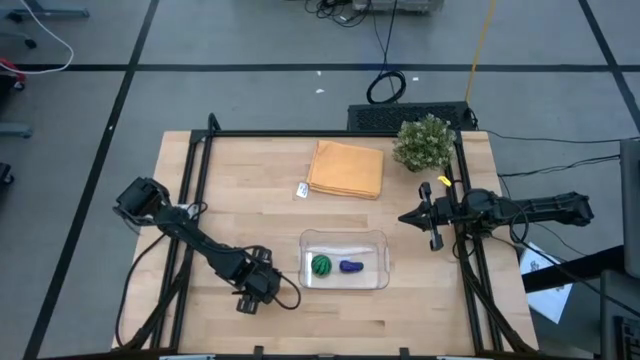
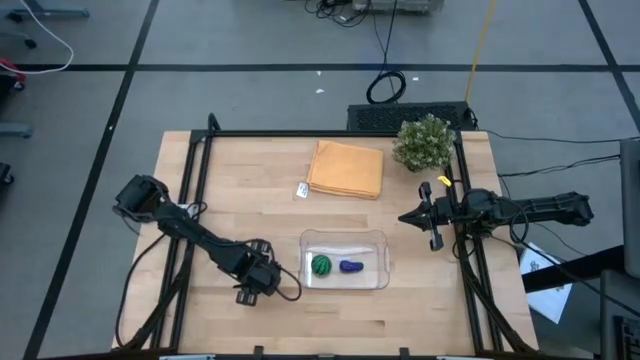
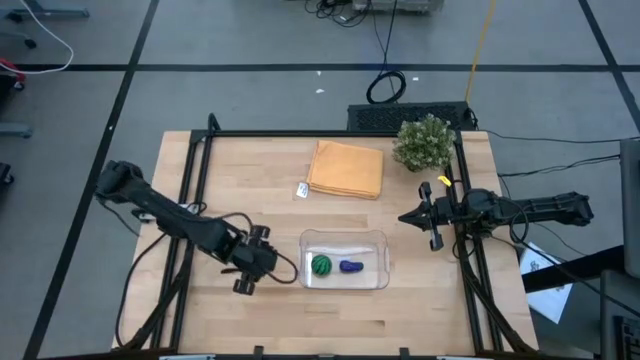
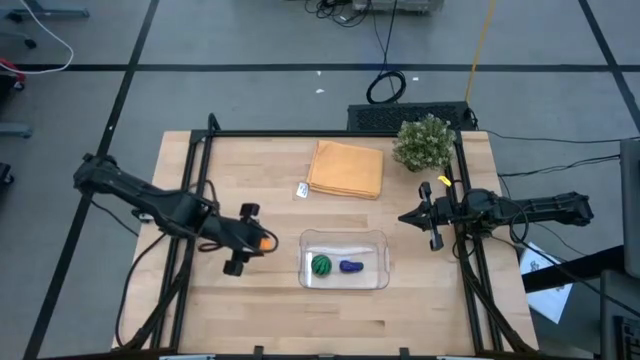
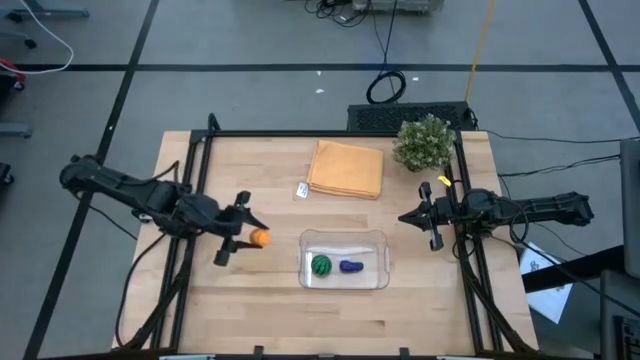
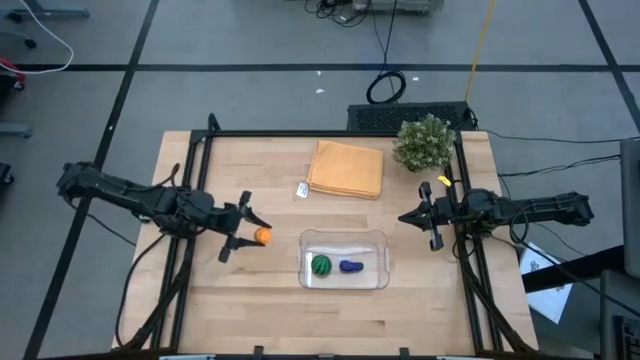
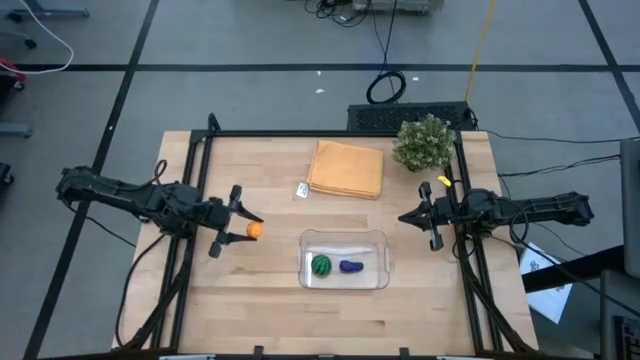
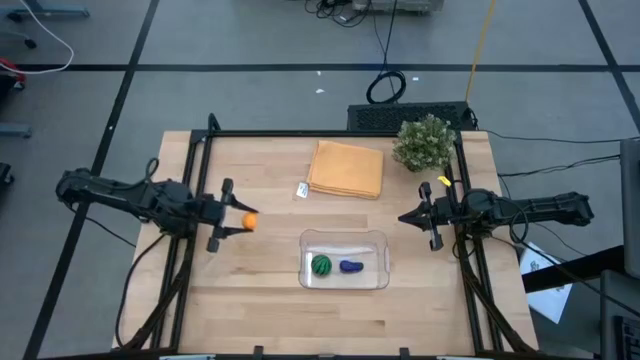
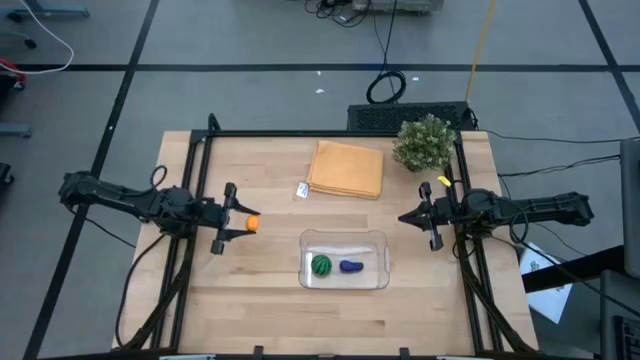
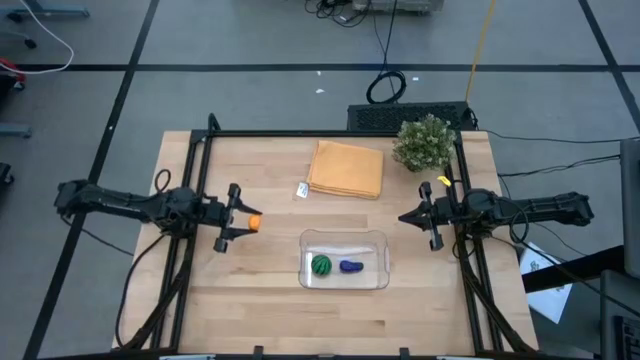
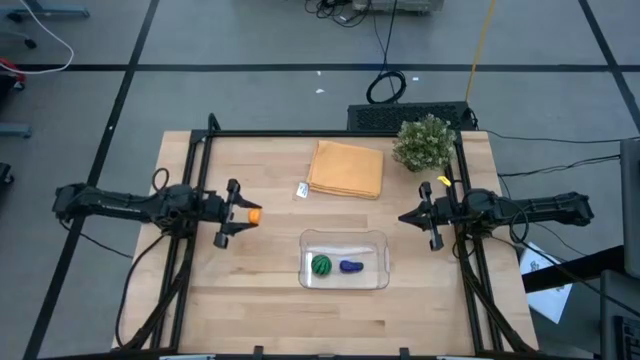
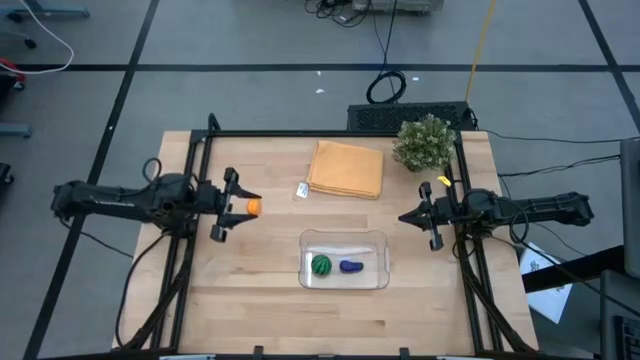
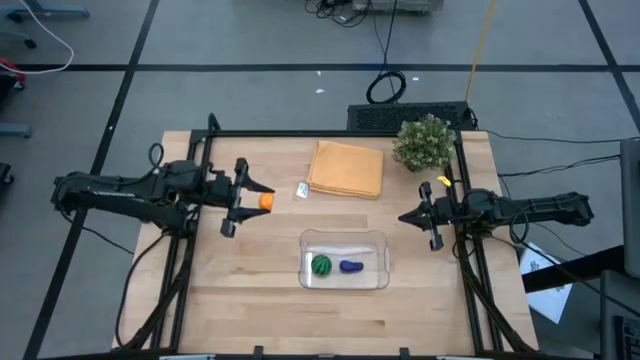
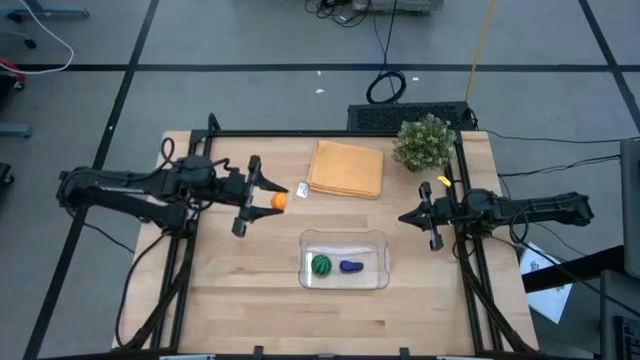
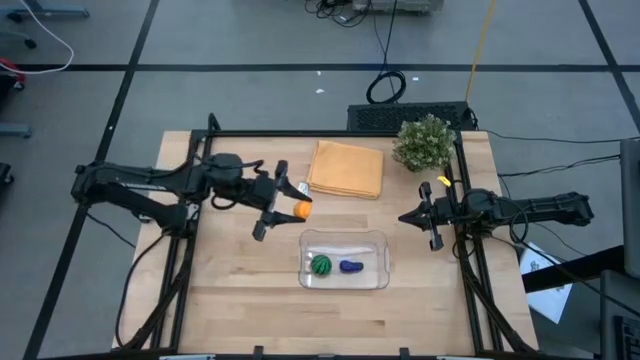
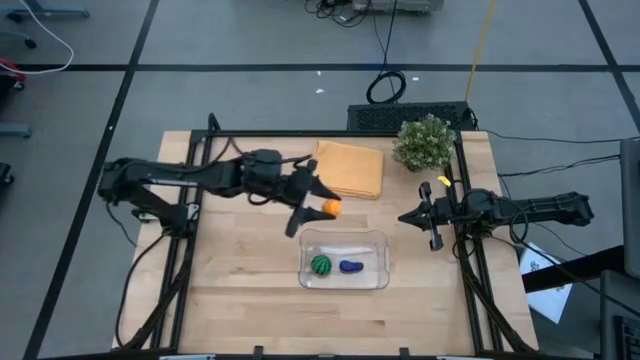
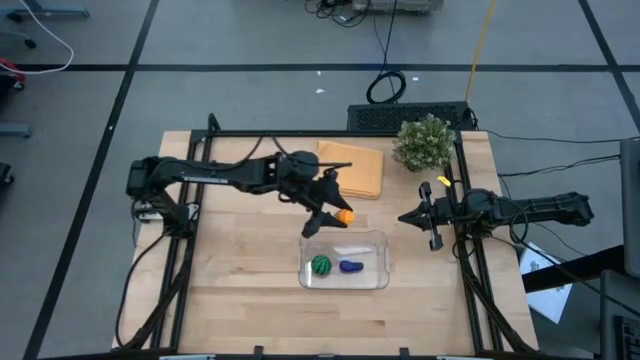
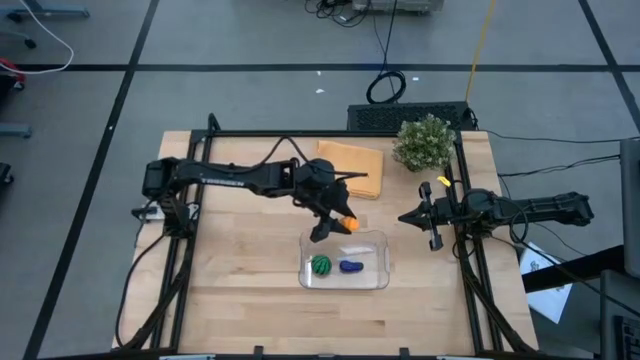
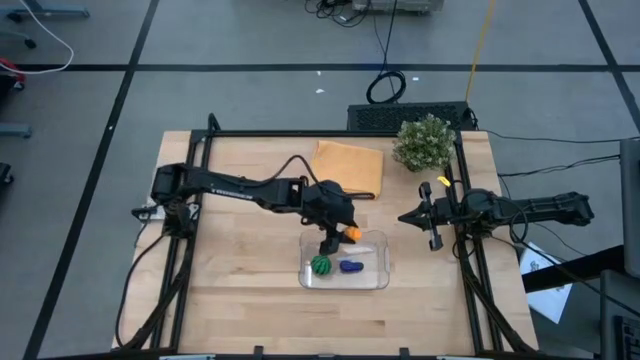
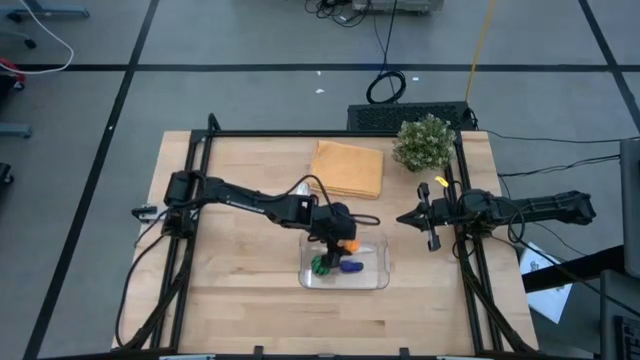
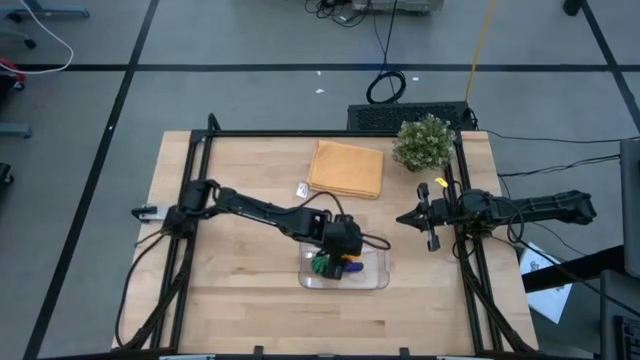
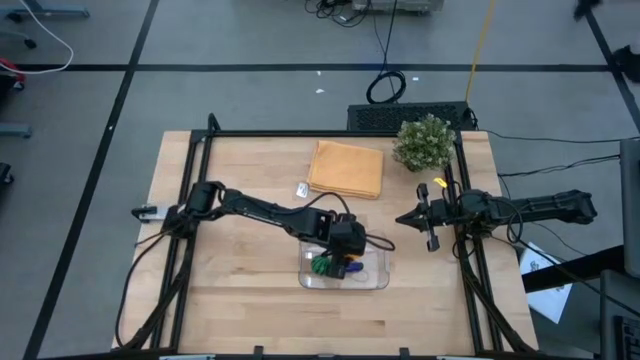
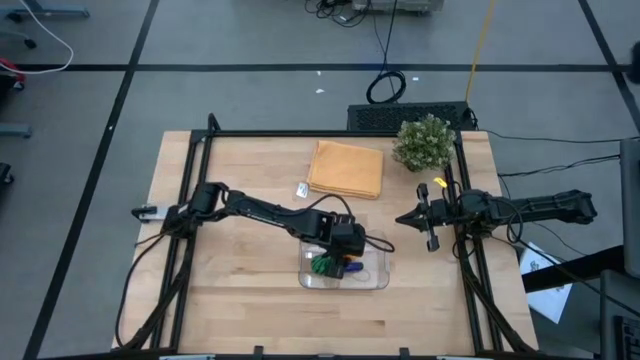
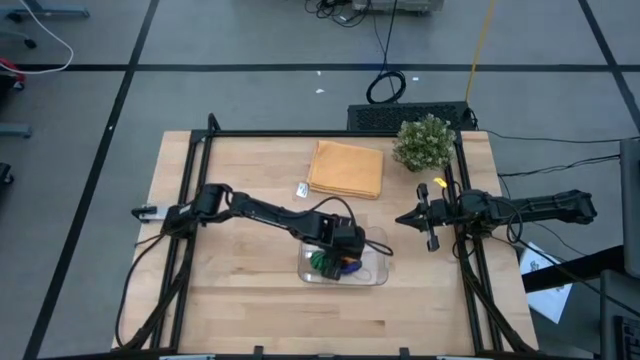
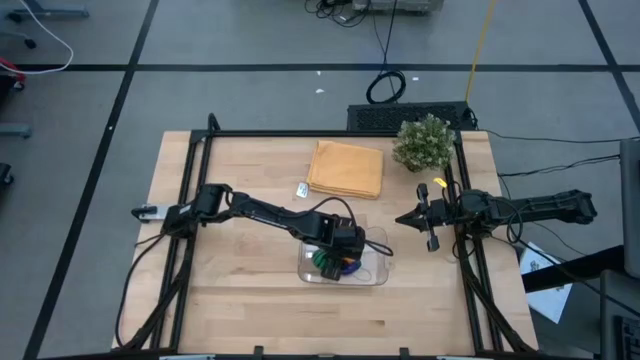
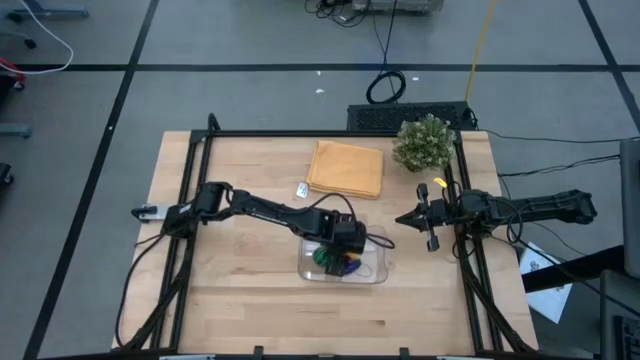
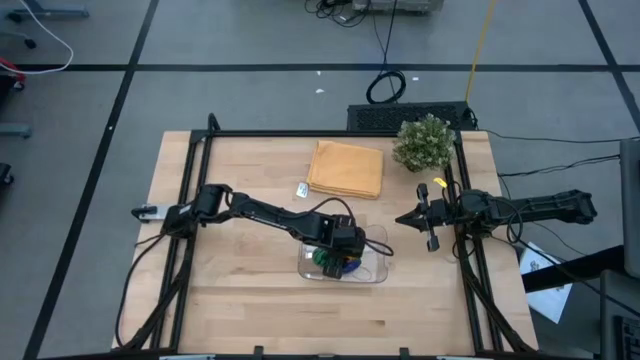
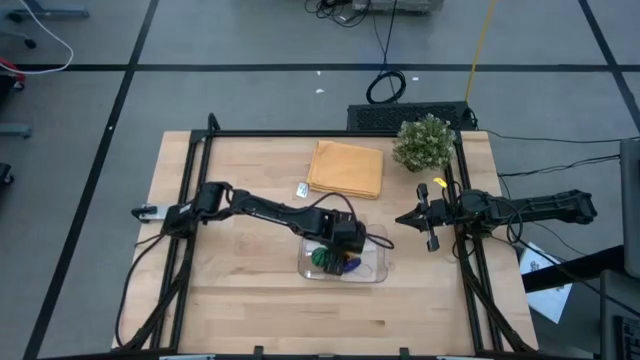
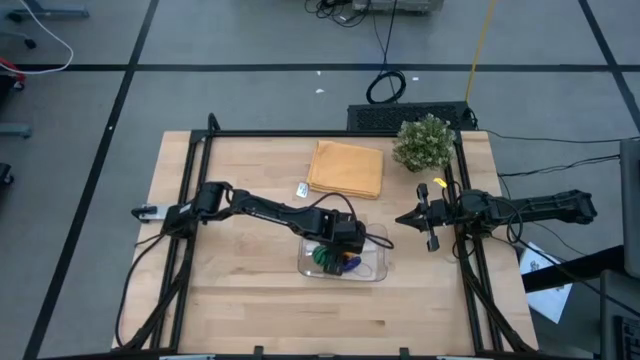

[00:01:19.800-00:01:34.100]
Task: Pick and placing Produce into tupperware
Put the croissant into the transparent bin

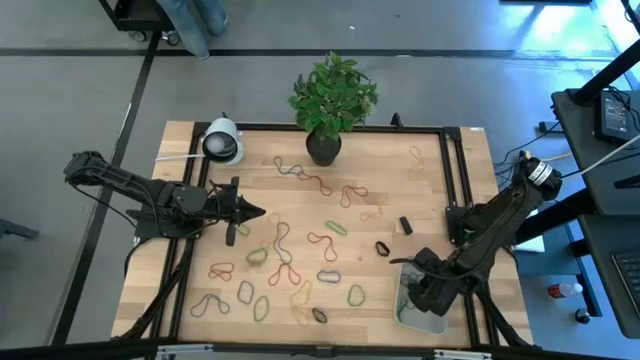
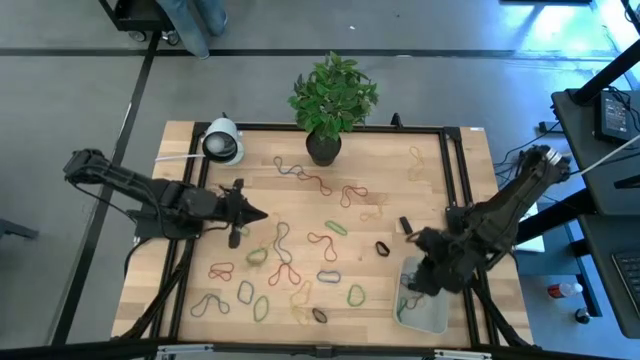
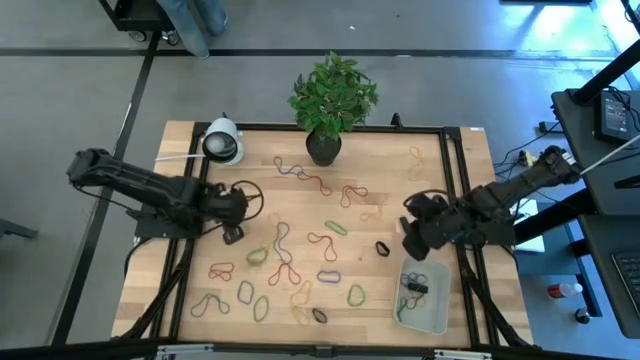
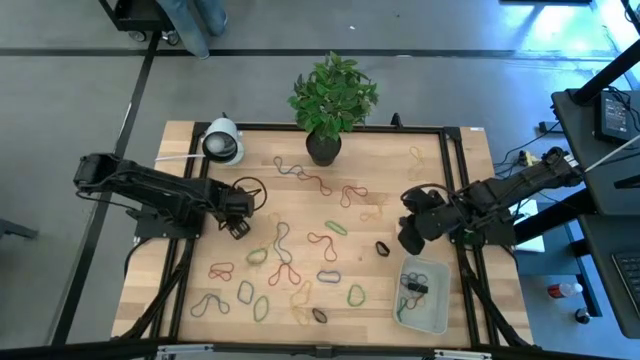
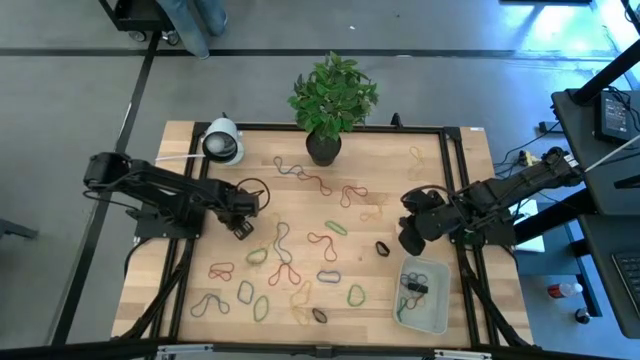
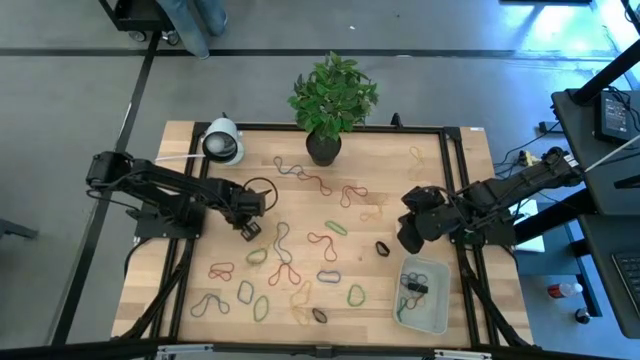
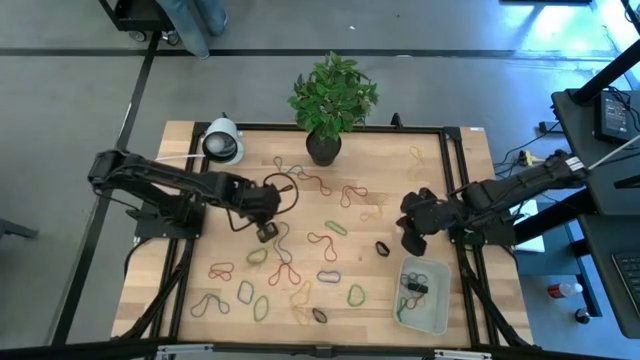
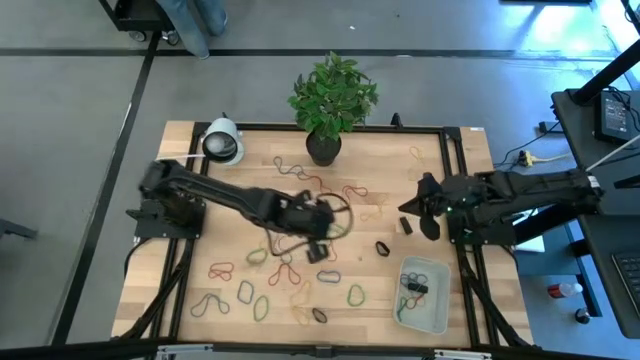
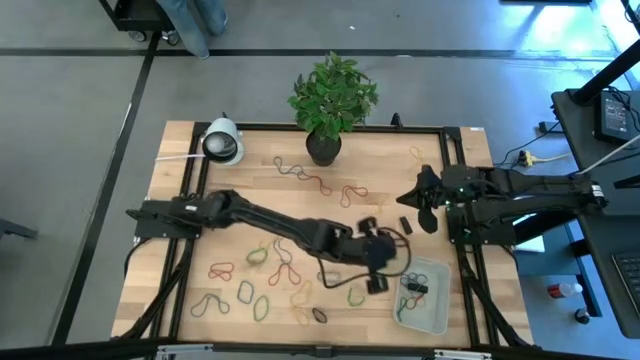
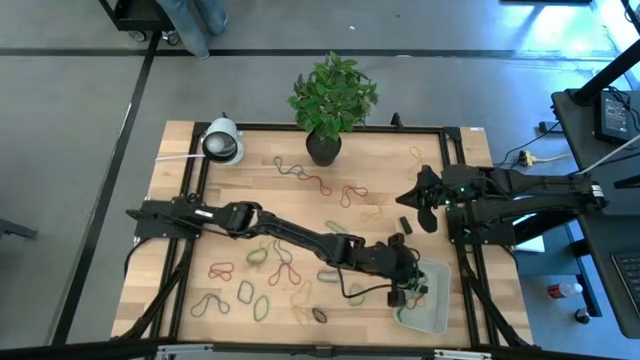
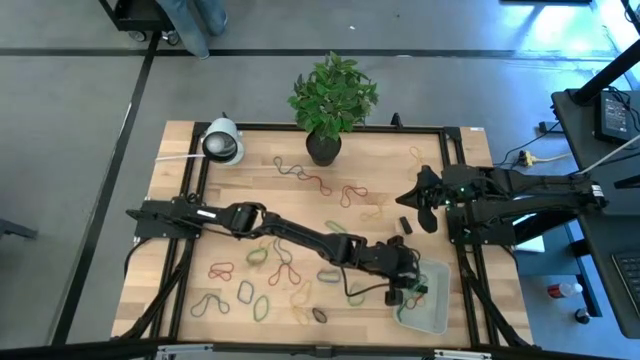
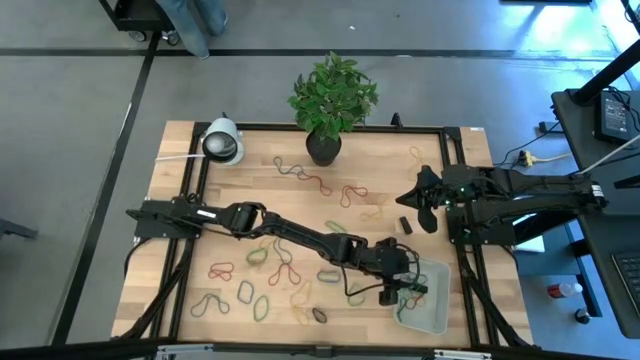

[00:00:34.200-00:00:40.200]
Task: Pick and place rubber bands into bin
Put the green rubber band into the gray bin

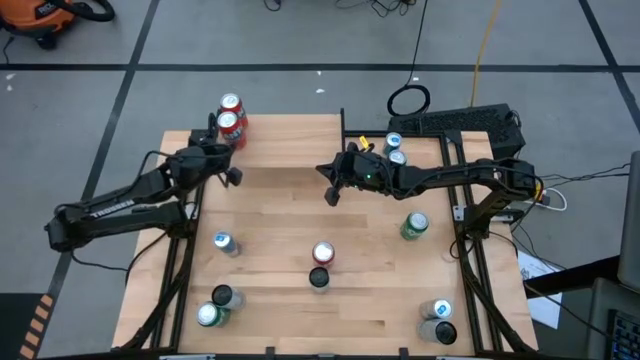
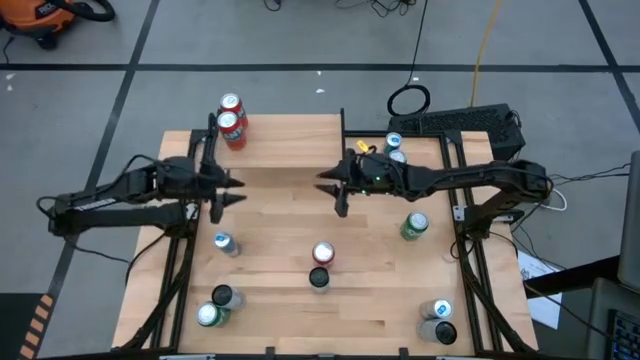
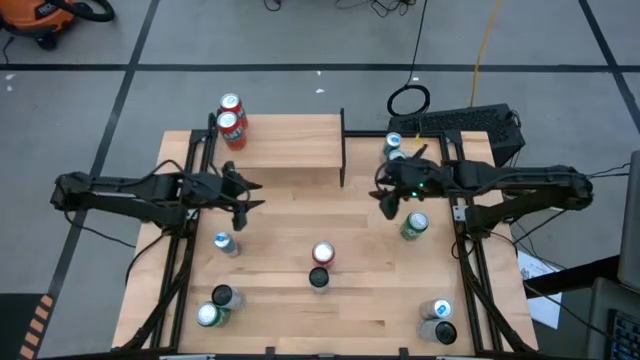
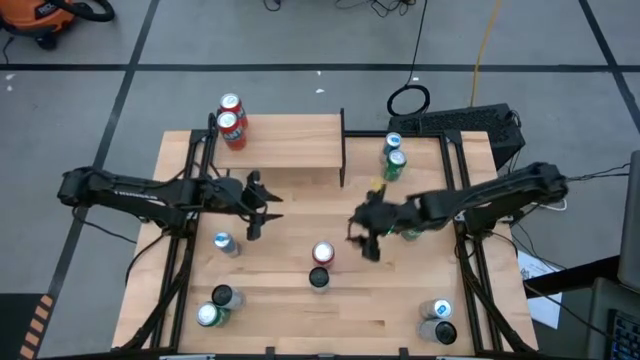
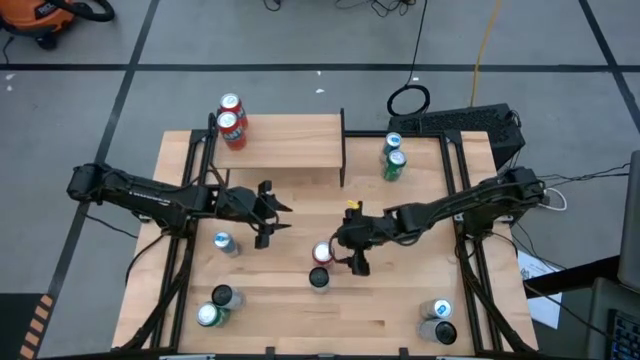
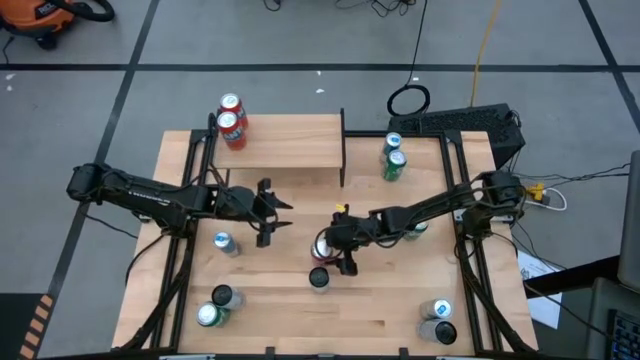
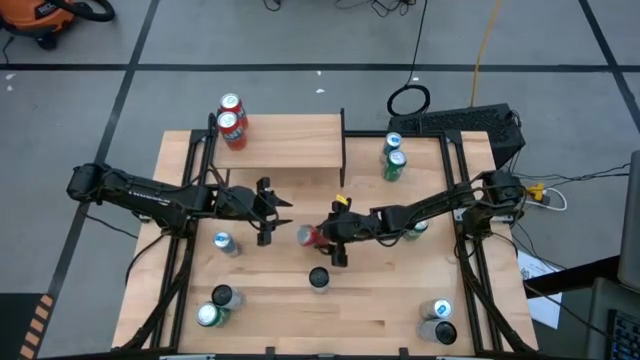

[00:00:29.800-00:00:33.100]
Task: Place canned beverage on shelf
Put the orange soda can on the shelf
